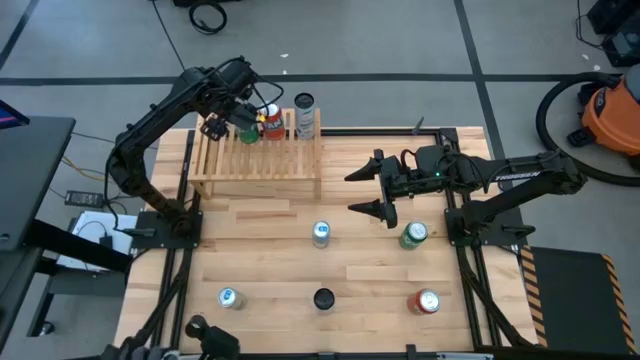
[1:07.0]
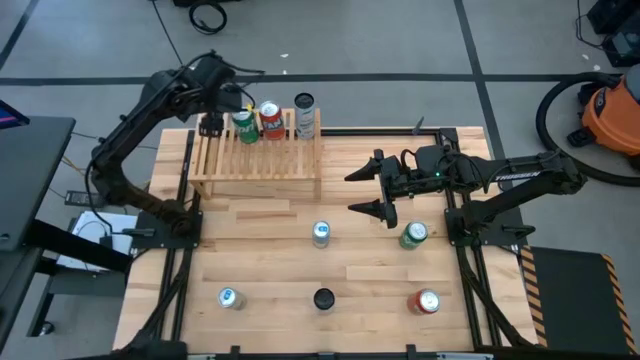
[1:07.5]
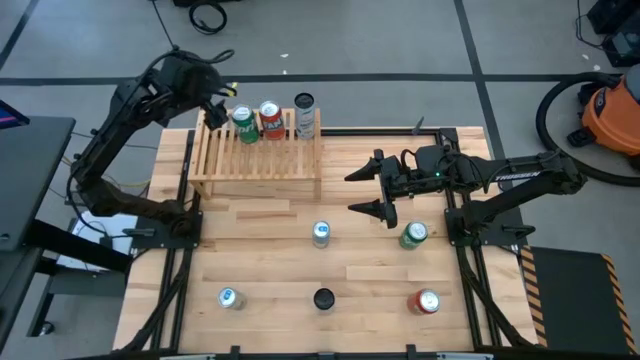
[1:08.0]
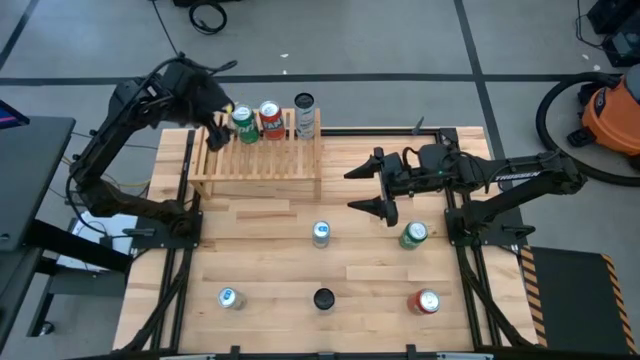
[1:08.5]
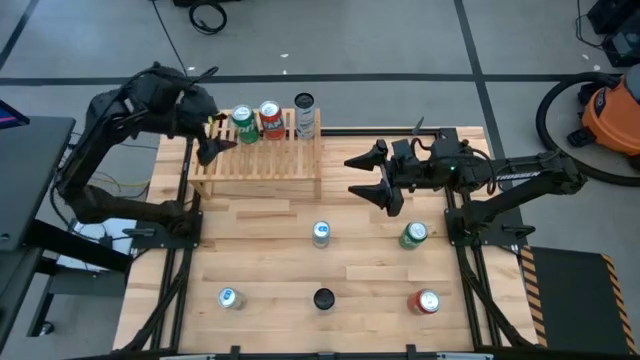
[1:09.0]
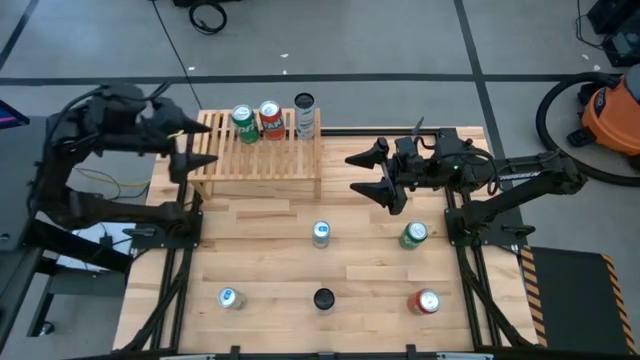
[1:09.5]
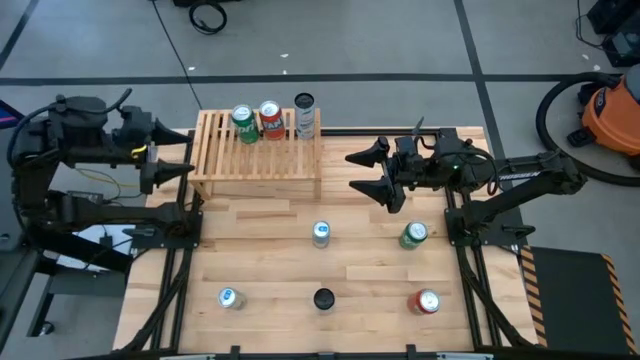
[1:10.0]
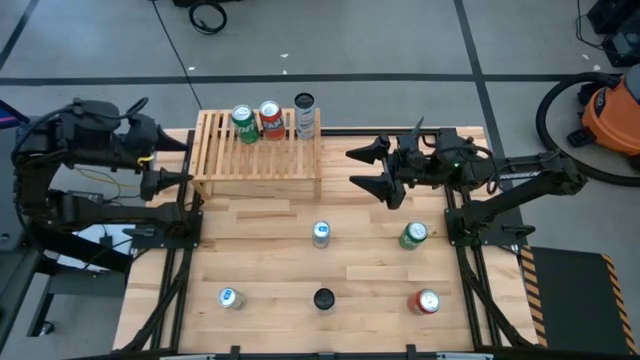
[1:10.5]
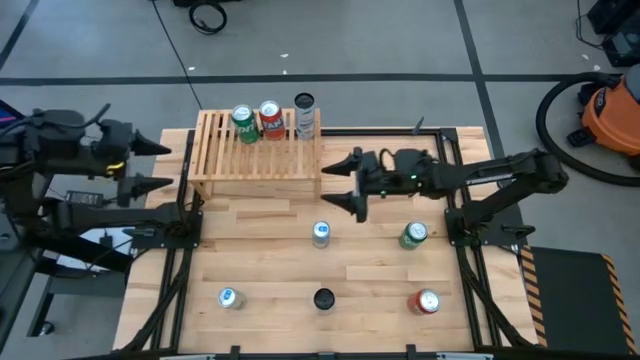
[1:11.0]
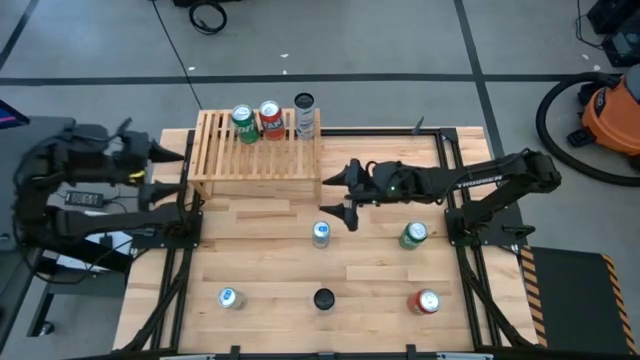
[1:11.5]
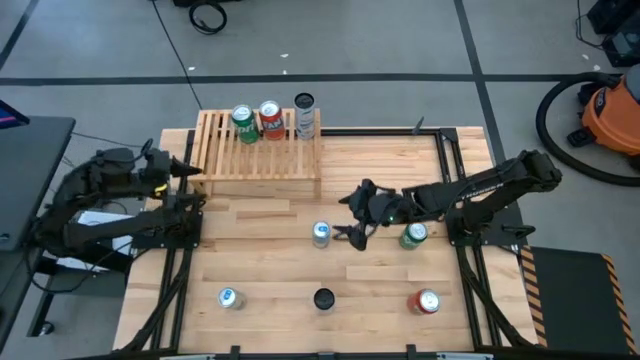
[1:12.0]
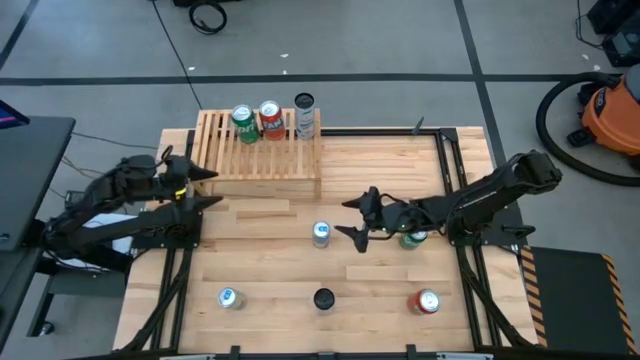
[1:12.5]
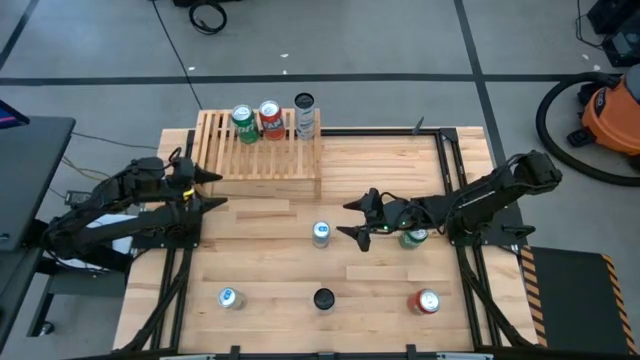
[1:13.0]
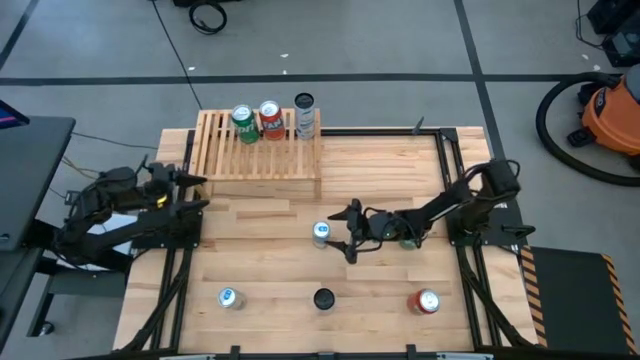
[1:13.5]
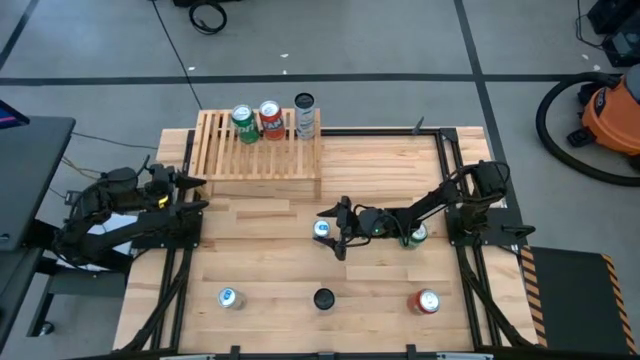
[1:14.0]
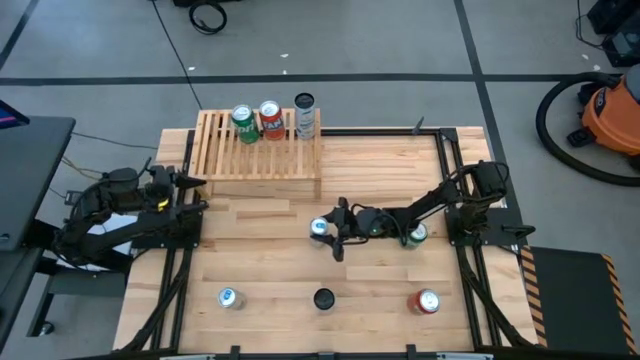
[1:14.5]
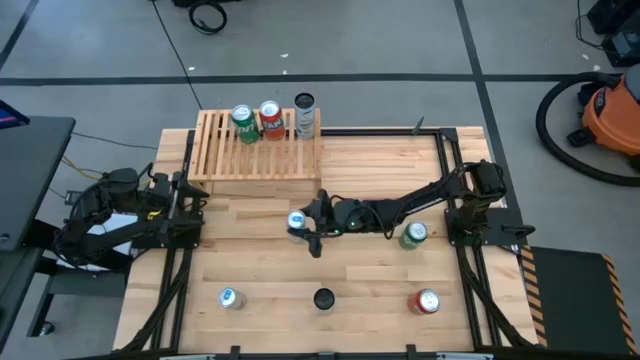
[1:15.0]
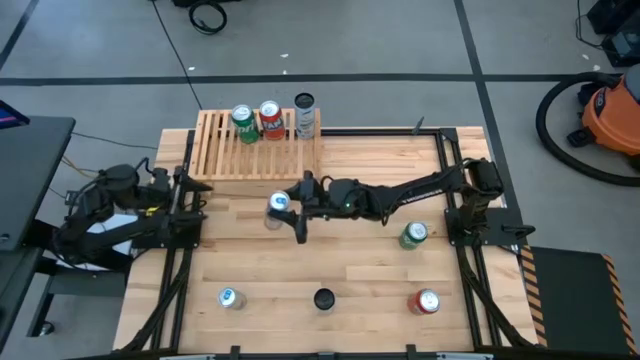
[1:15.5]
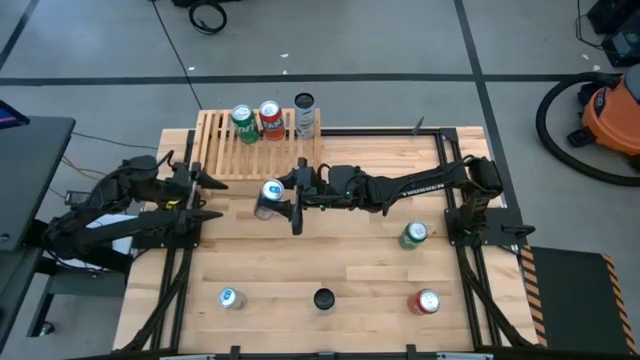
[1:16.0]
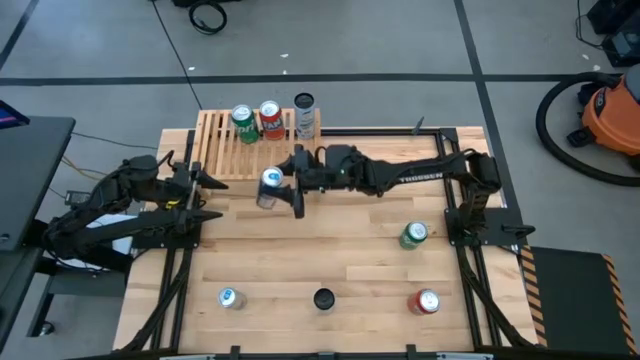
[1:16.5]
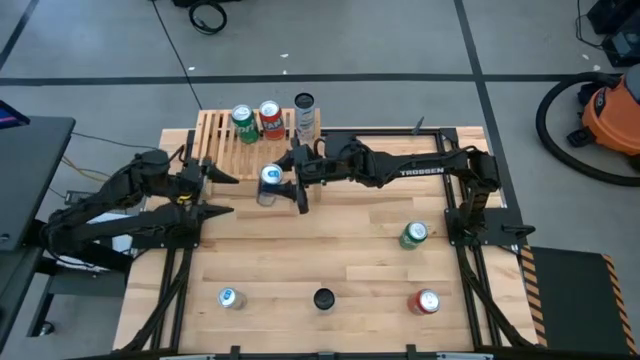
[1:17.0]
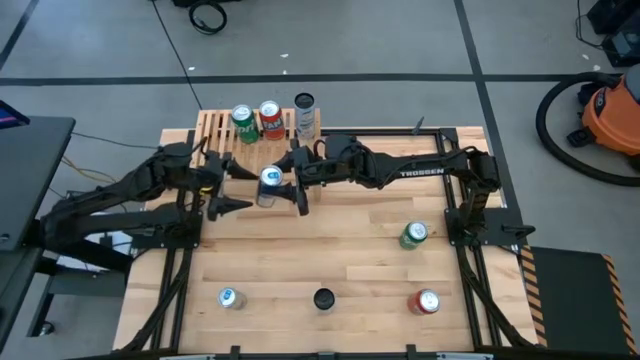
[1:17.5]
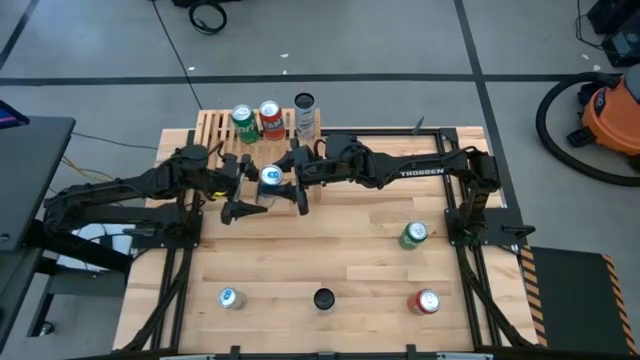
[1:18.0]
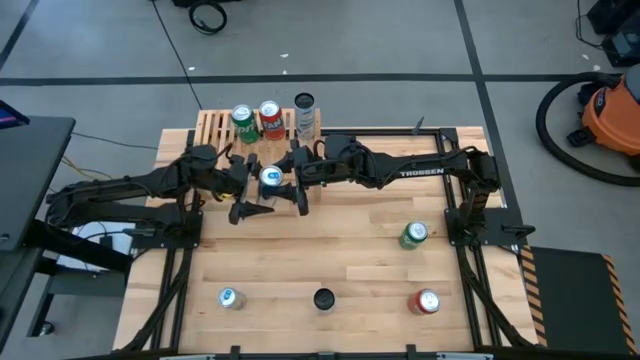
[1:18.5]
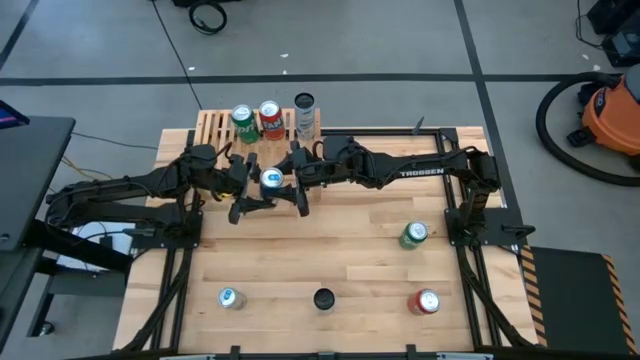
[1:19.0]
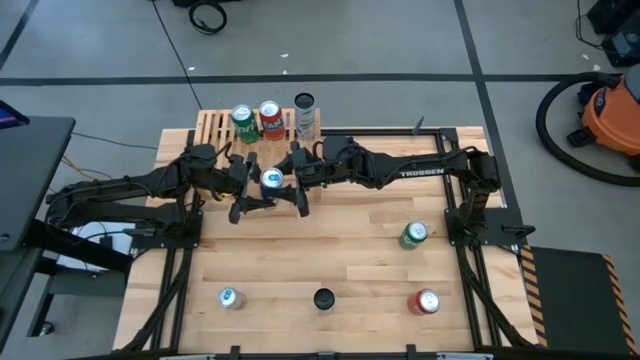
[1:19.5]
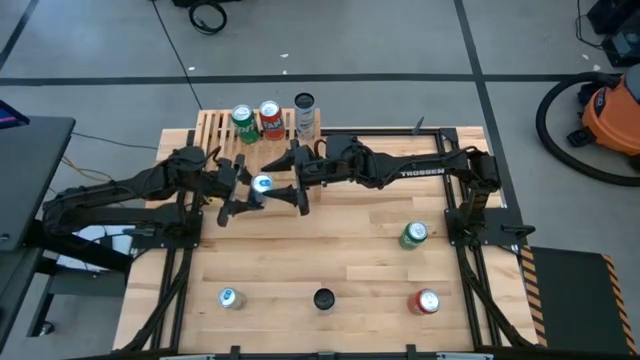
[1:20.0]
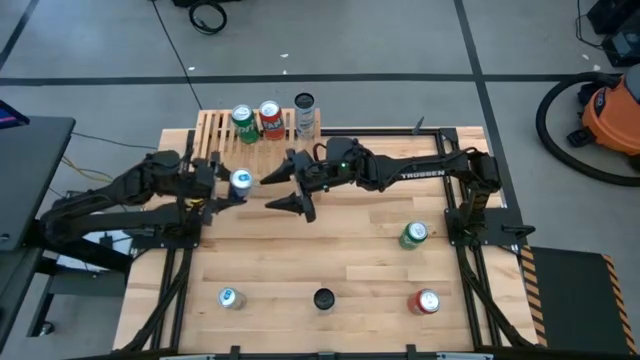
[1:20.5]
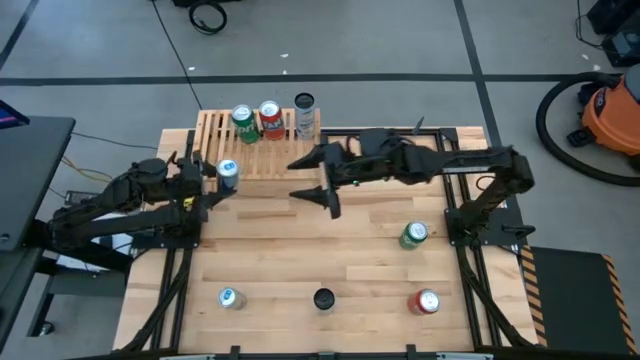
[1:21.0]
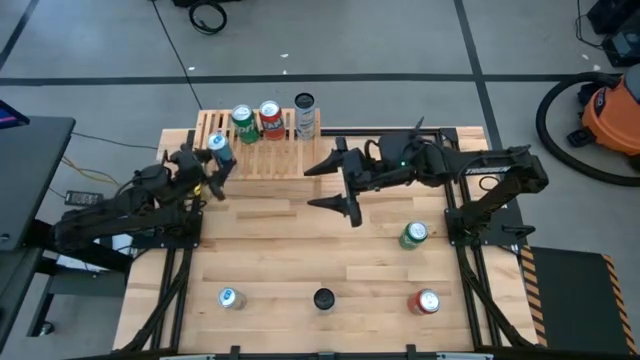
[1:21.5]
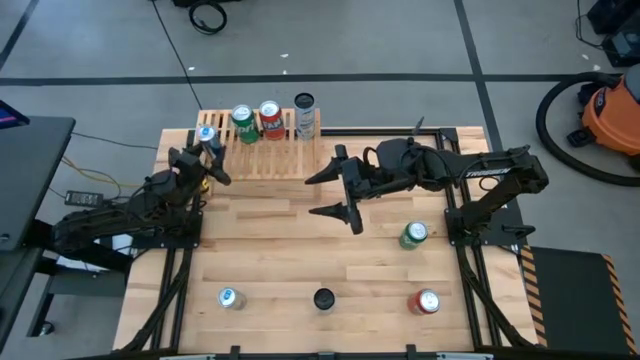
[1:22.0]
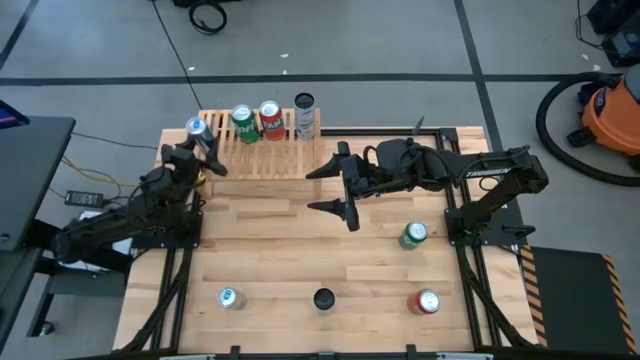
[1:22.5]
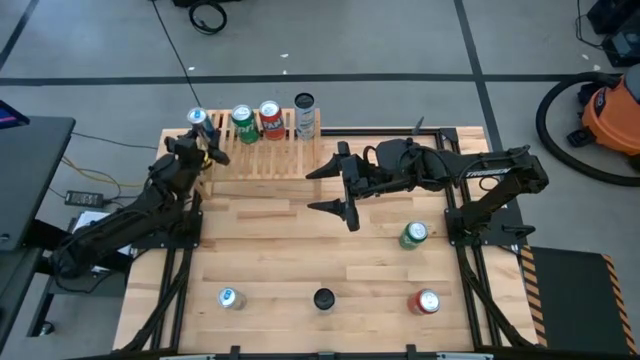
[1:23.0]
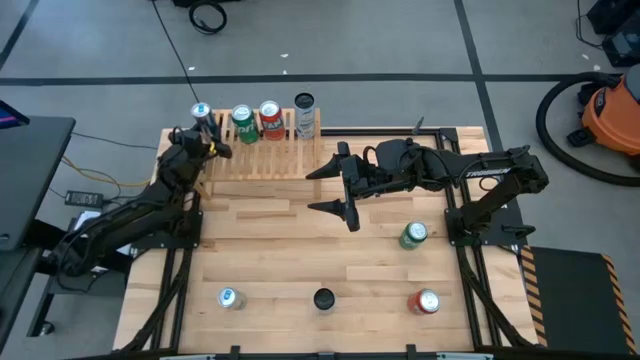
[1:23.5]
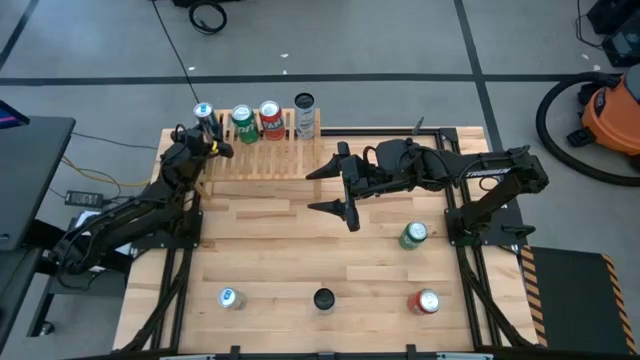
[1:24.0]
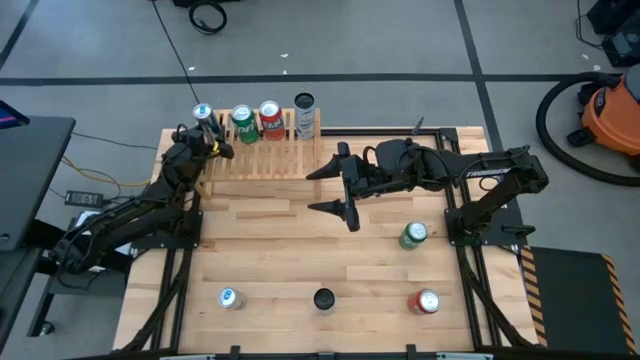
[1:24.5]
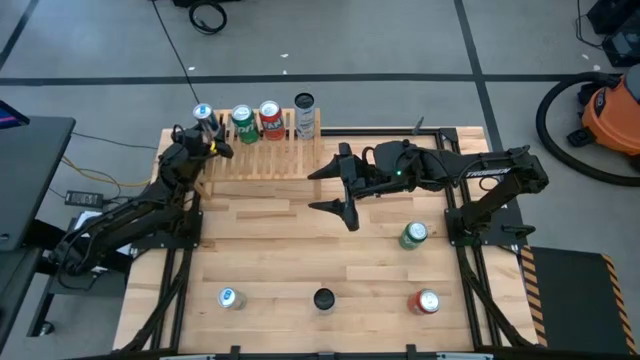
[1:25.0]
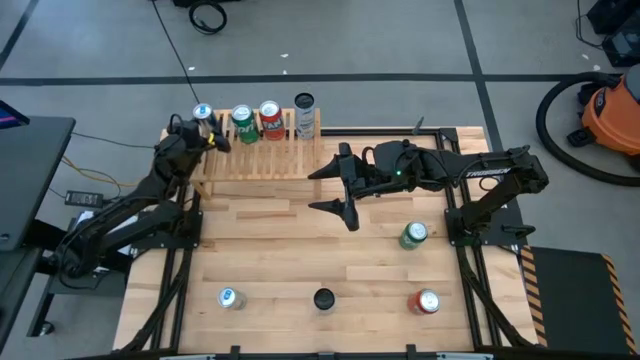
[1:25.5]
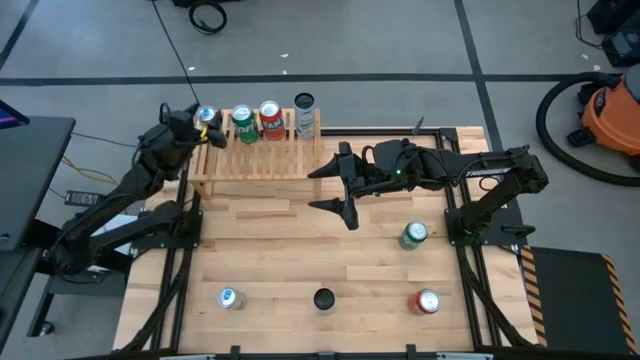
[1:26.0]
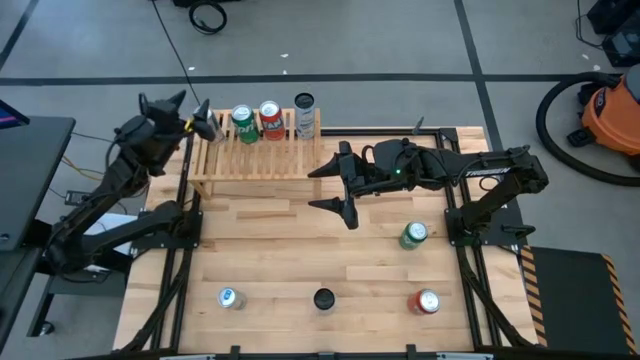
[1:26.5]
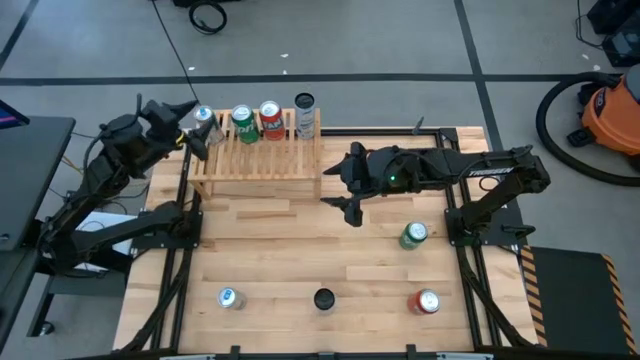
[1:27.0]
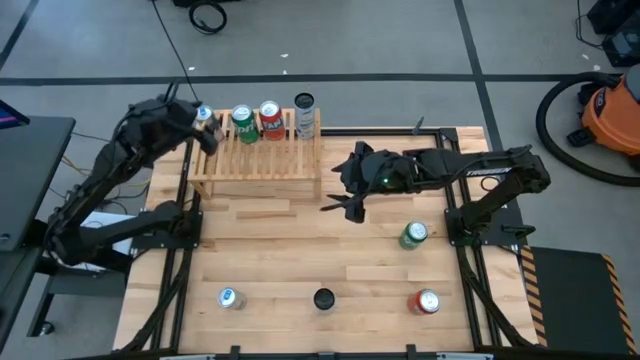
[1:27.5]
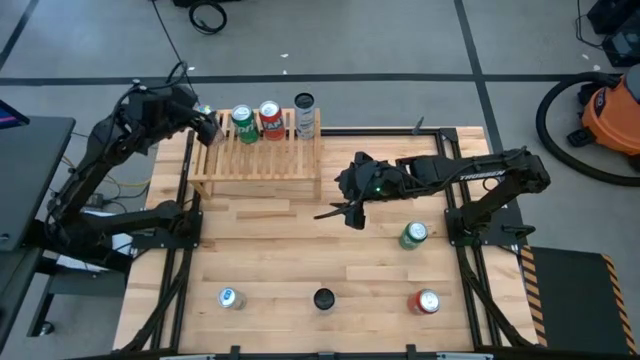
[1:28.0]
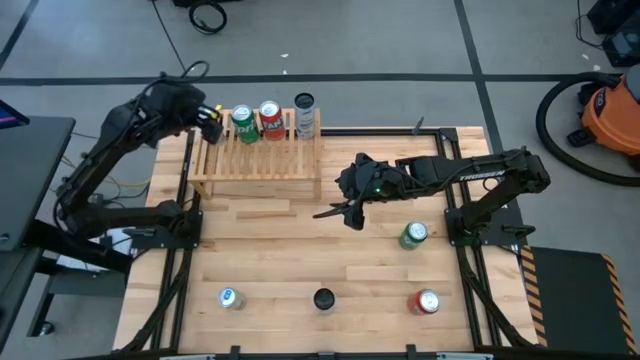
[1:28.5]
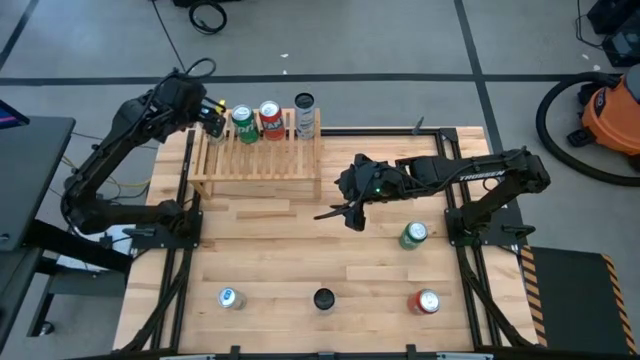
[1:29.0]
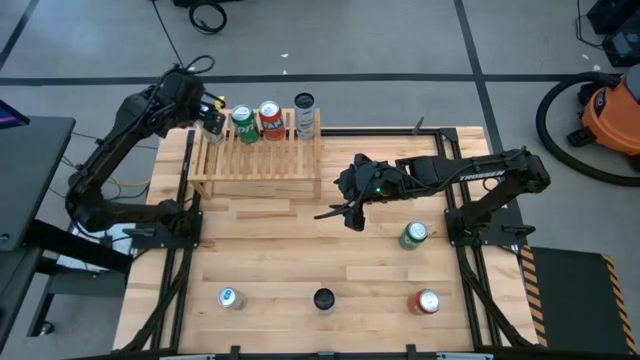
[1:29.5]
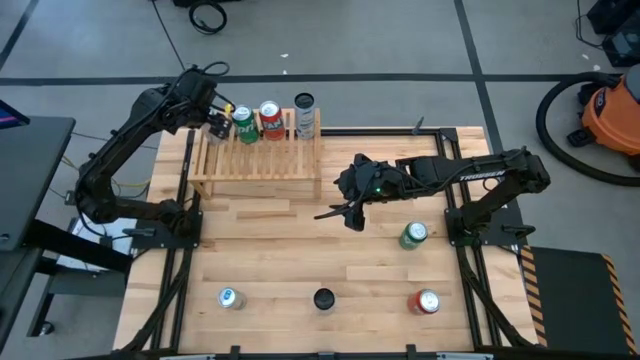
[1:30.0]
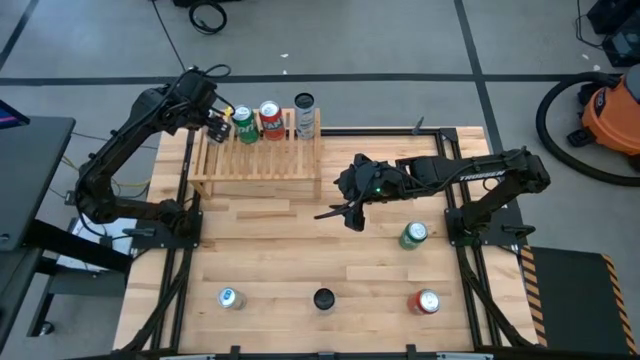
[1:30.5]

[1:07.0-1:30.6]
Task: Place canned beverage on shelf
Put the top blue soda can on the shelf
